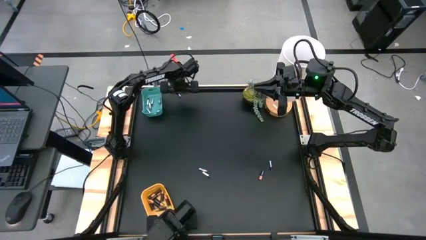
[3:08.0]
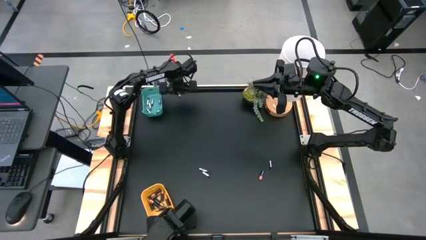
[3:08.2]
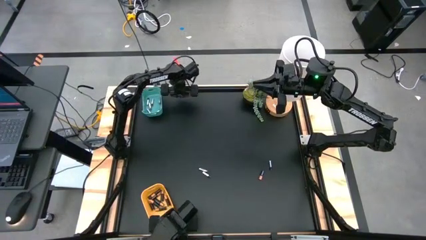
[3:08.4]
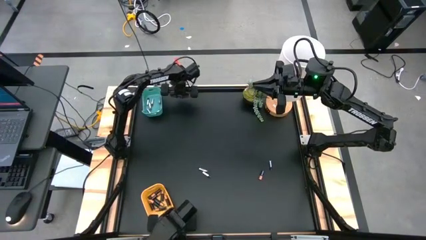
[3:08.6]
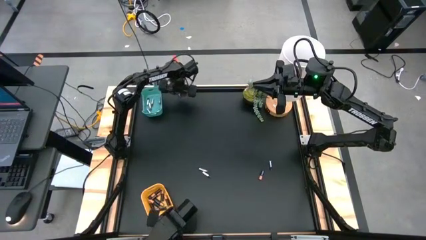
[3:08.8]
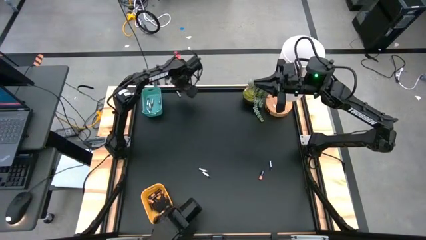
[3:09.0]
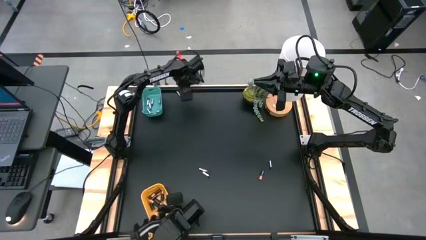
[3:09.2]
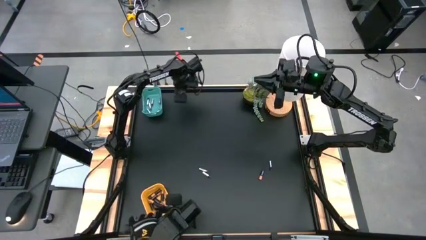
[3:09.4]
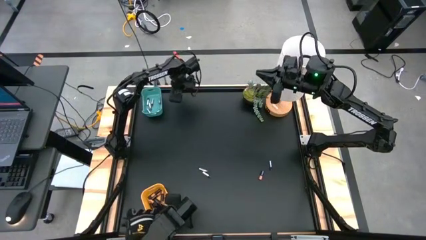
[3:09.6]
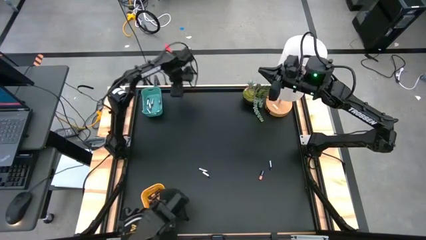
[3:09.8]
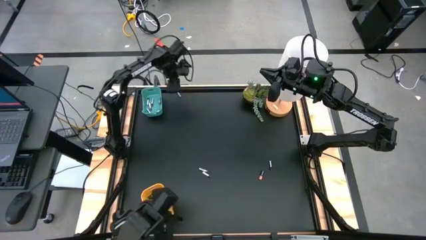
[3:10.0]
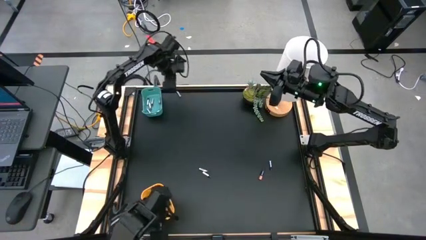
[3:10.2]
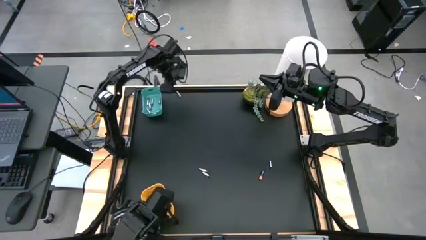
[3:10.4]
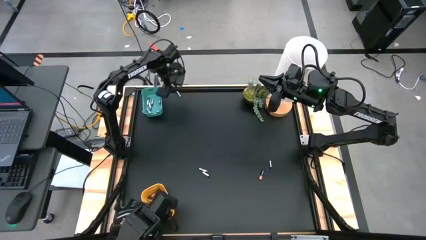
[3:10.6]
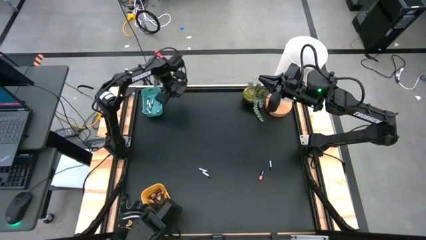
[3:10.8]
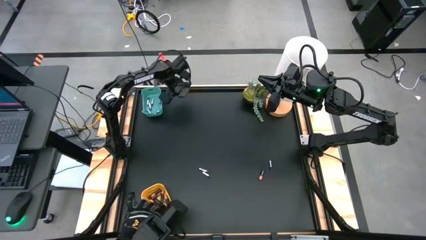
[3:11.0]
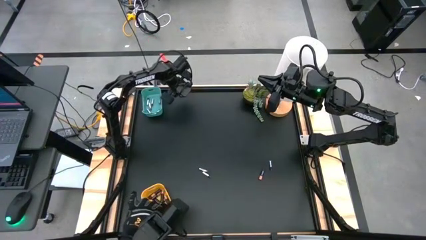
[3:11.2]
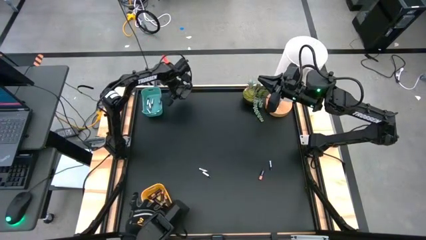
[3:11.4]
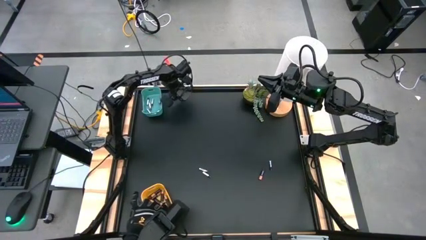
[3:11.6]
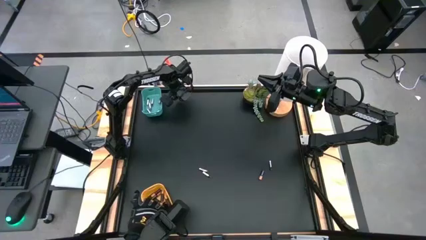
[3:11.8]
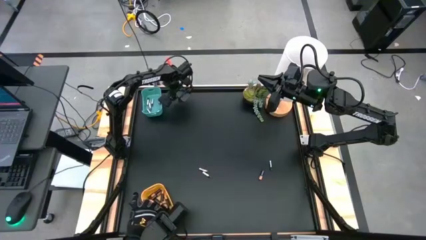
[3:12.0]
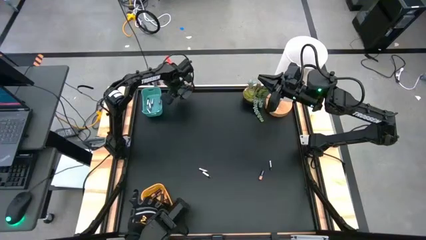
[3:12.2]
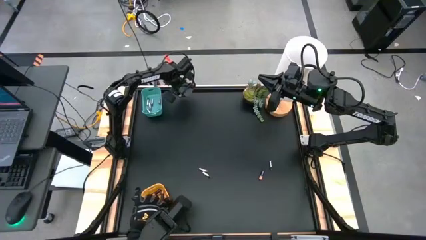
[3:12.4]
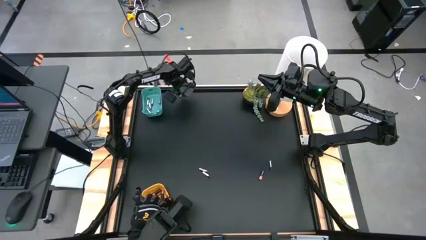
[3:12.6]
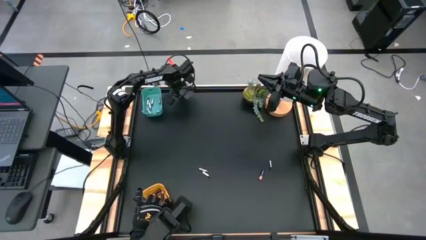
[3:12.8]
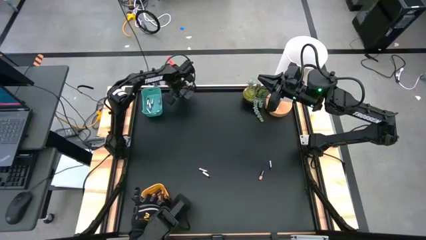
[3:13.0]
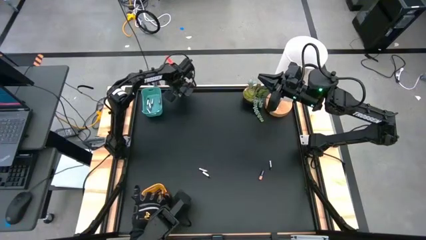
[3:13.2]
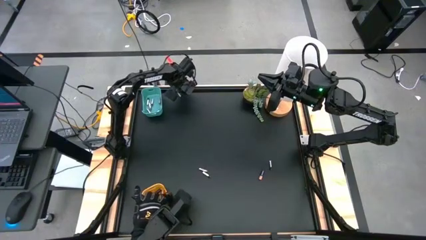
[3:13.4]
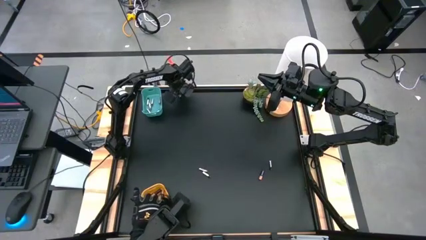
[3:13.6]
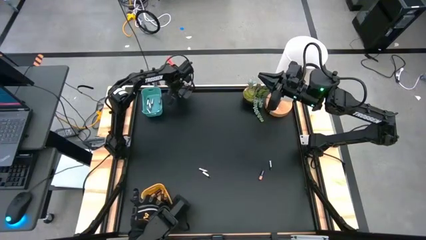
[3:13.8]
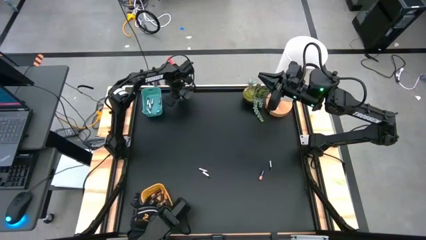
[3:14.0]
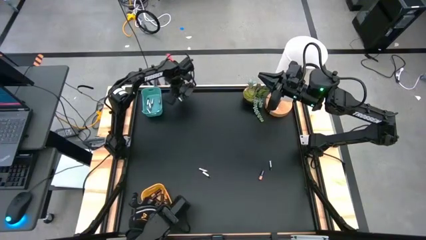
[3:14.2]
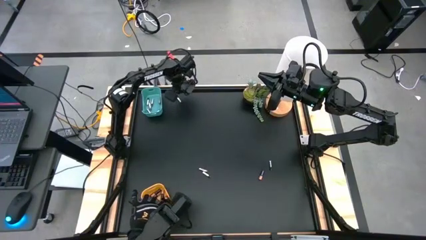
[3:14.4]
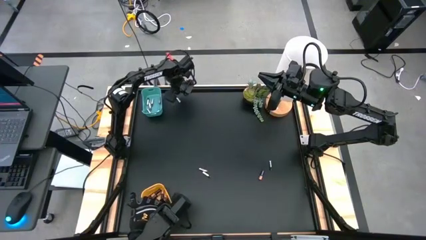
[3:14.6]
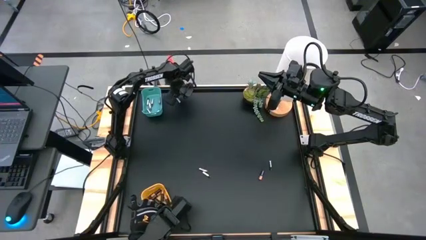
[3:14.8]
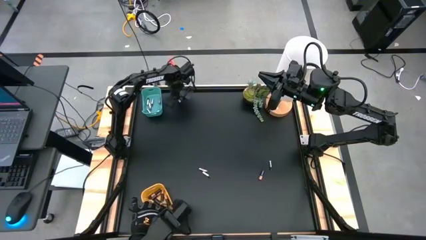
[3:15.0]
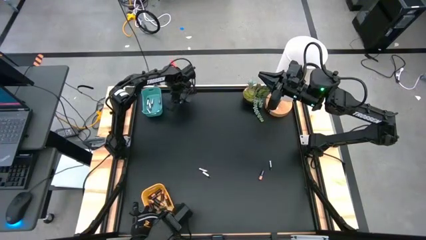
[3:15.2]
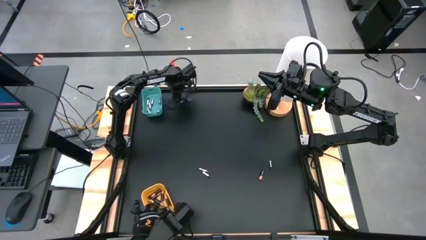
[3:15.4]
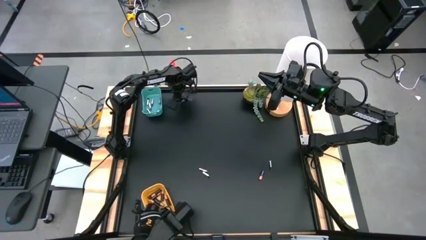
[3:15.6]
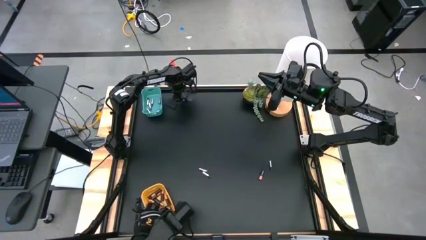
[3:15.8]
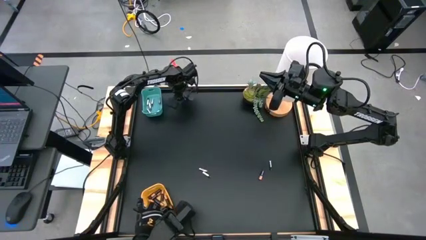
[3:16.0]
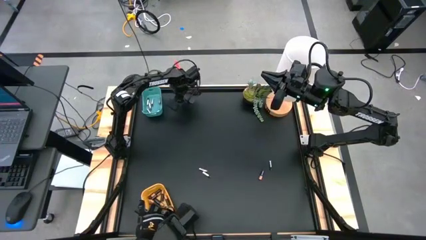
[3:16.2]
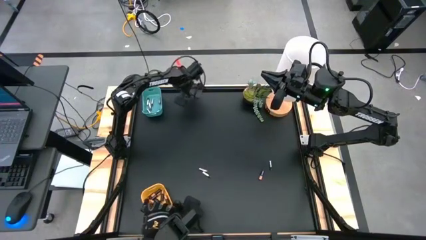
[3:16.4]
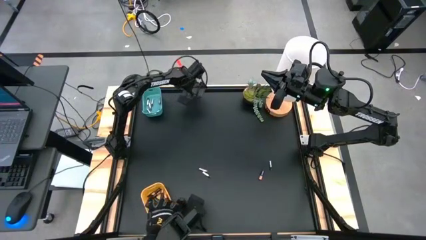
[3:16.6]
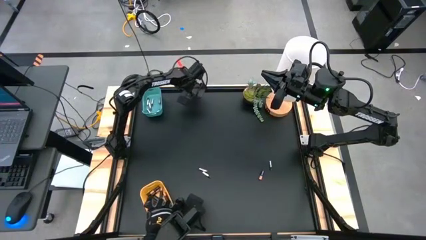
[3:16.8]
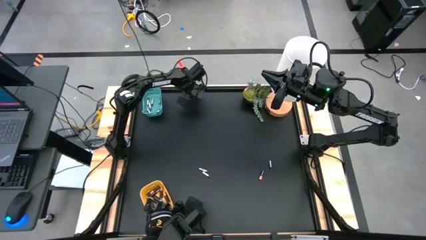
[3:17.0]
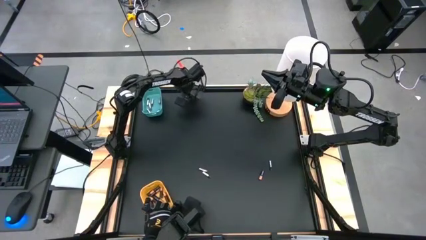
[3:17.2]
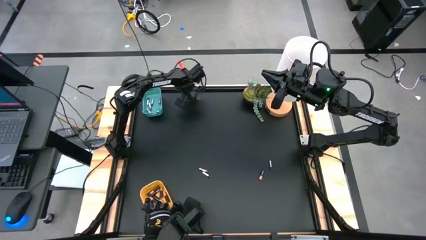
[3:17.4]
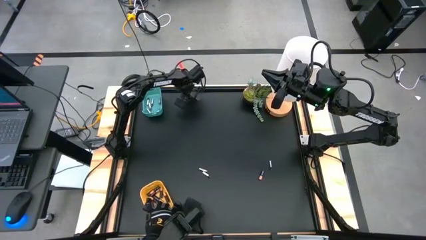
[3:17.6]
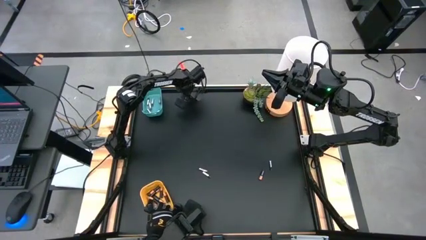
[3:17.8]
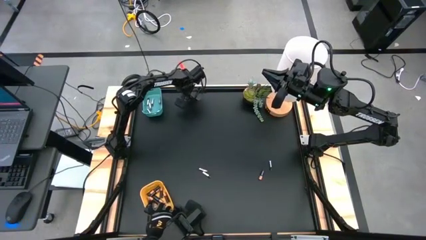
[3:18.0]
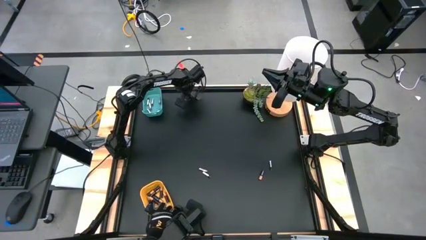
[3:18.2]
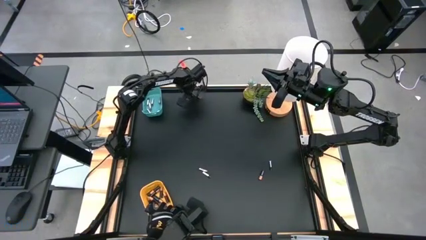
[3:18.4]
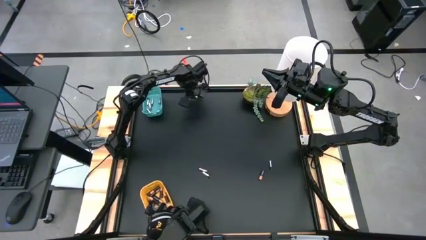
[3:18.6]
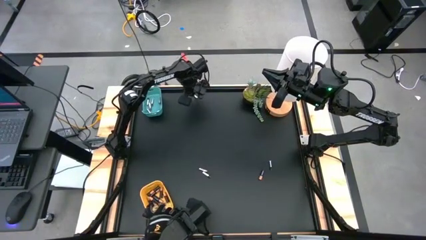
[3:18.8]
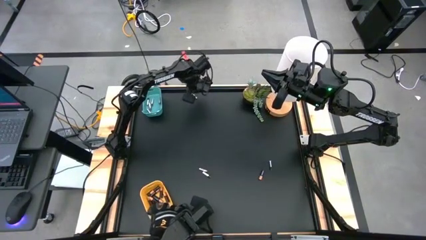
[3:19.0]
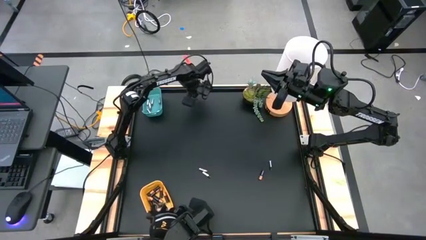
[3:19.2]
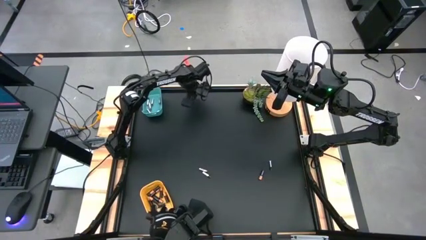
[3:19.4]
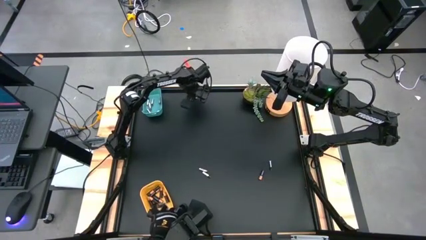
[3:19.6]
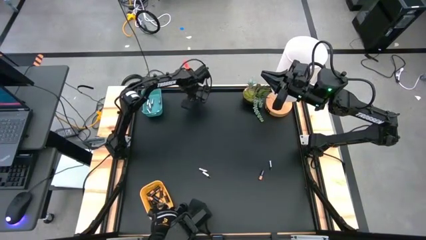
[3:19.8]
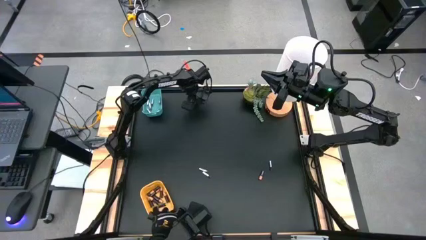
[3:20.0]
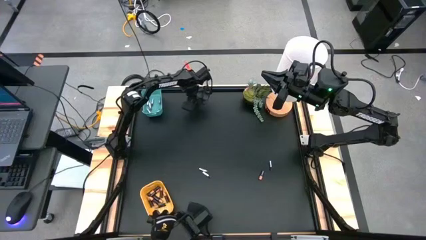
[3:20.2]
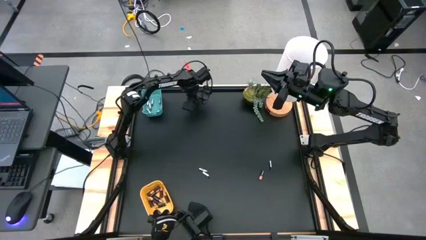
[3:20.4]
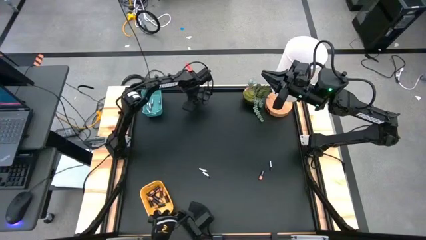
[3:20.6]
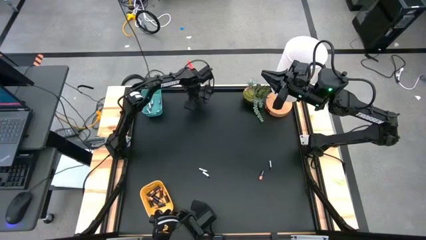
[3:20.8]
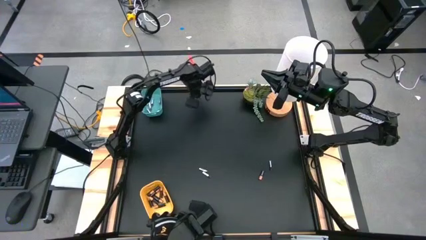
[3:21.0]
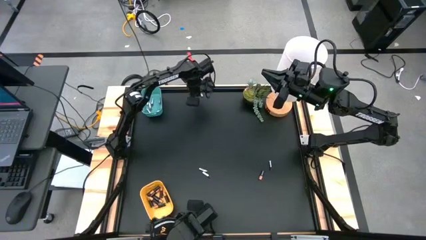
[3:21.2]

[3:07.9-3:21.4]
Task: Sort batteries
Put the silver battery into the blue bin

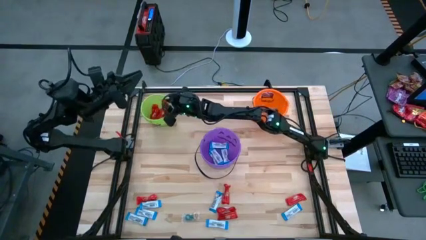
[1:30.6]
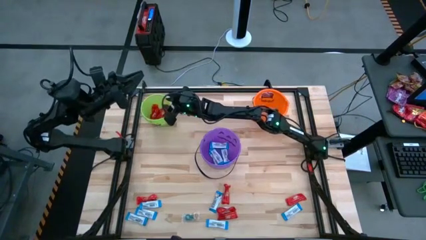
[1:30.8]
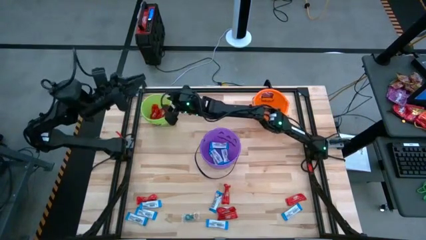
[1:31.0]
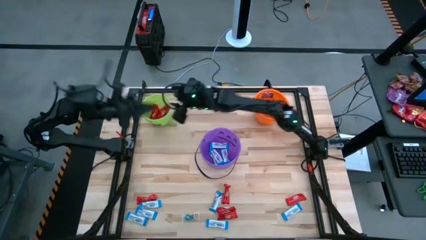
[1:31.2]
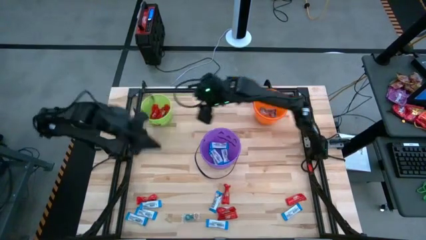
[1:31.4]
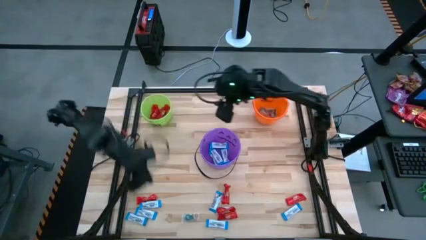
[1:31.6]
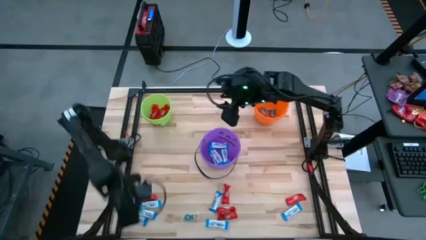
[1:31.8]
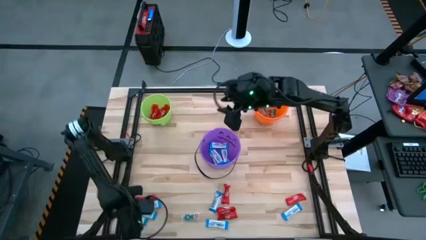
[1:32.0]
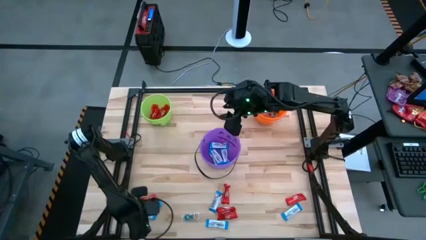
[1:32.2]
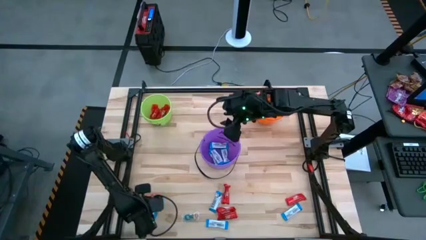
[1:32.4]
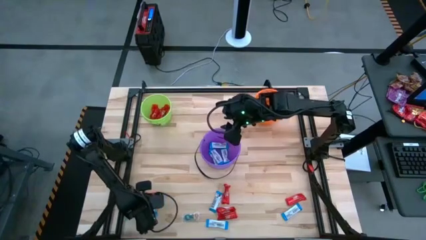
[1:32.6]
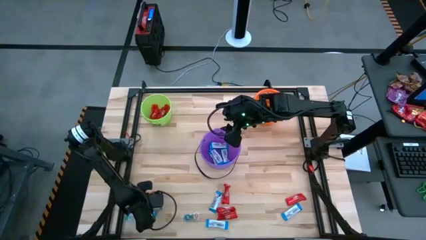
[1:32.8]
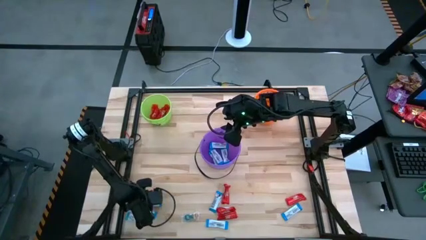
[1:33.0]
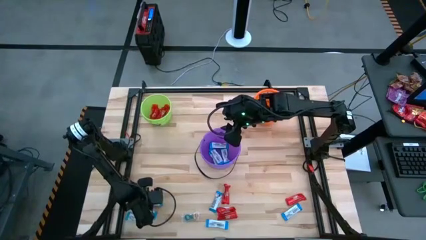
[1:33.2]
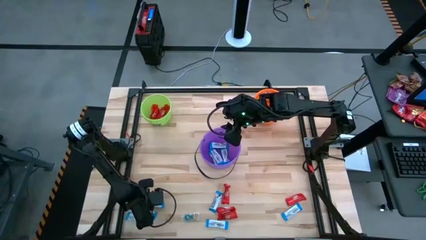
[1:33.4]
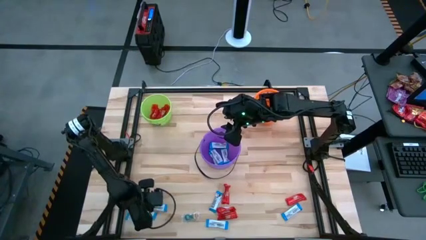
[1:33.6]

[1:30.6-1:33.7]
Task: Sort candy by brand, put in halloween buckets
Put the white chocolate into the purple bucket
